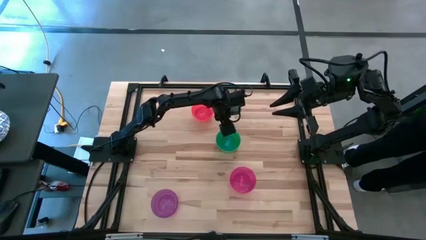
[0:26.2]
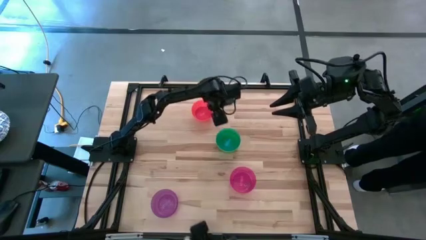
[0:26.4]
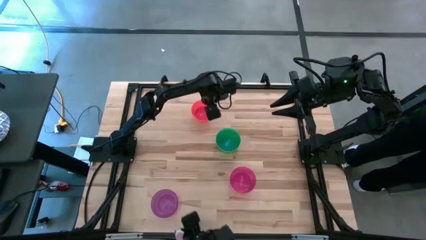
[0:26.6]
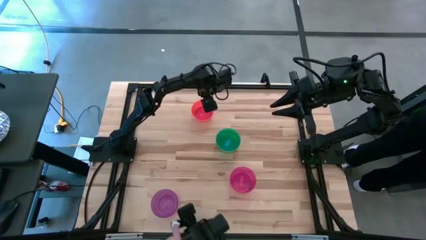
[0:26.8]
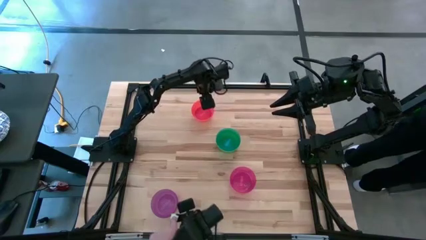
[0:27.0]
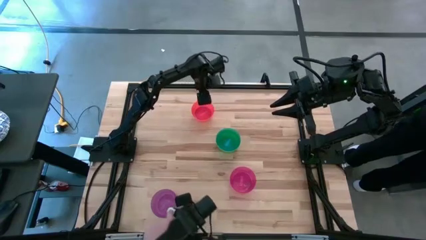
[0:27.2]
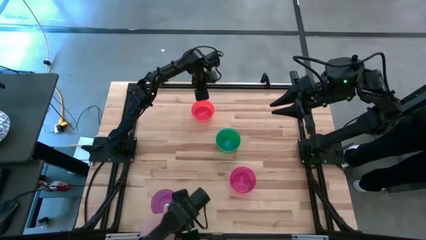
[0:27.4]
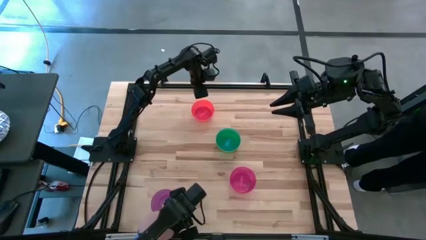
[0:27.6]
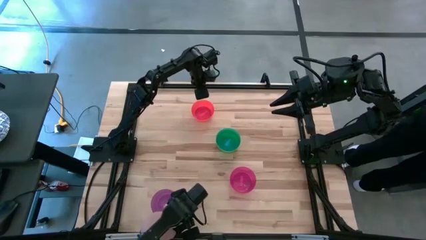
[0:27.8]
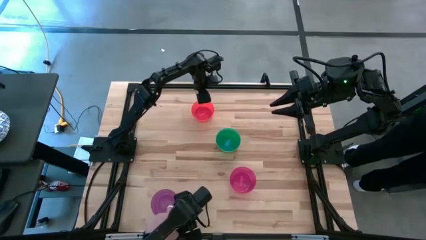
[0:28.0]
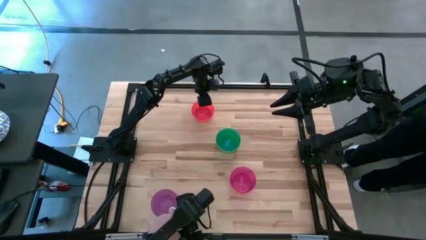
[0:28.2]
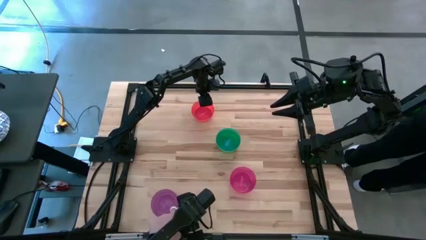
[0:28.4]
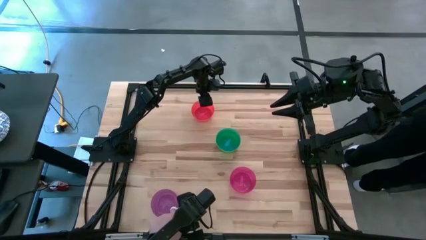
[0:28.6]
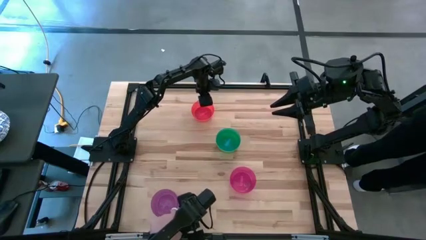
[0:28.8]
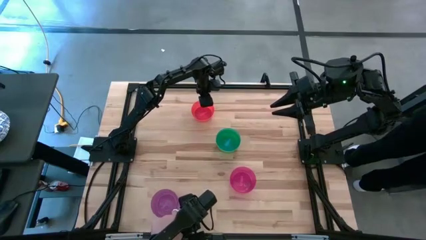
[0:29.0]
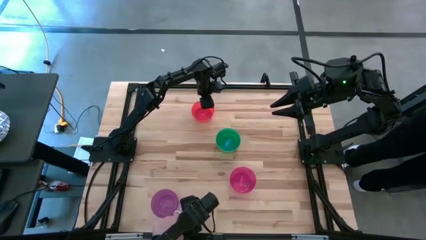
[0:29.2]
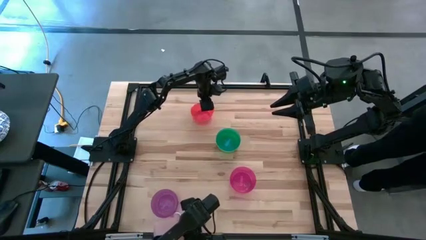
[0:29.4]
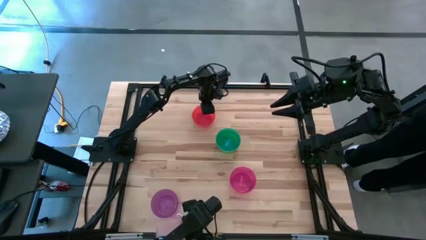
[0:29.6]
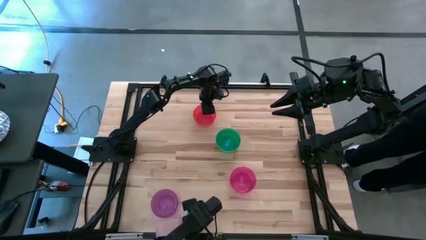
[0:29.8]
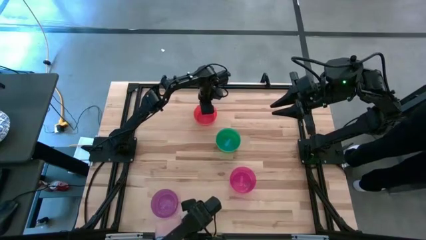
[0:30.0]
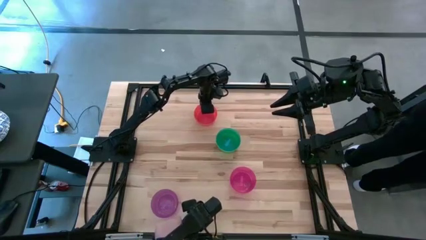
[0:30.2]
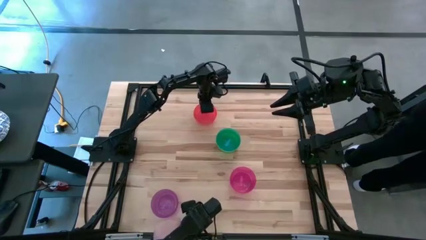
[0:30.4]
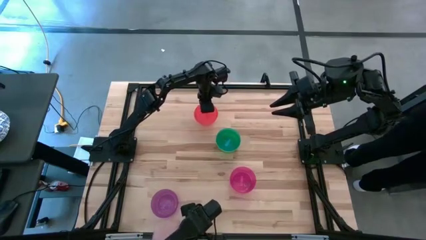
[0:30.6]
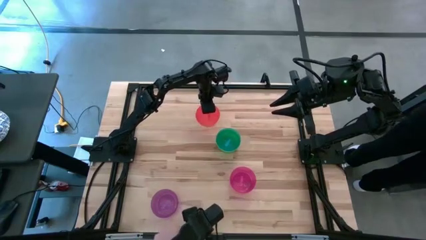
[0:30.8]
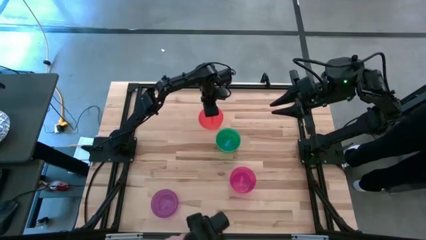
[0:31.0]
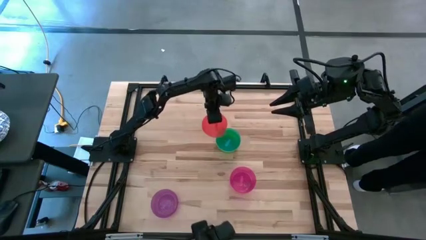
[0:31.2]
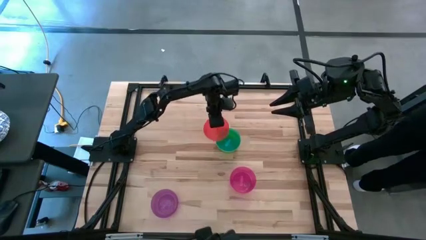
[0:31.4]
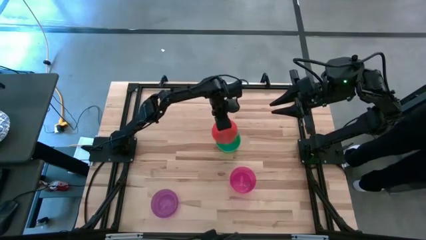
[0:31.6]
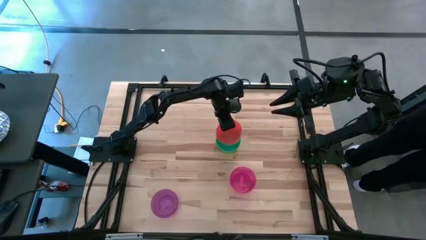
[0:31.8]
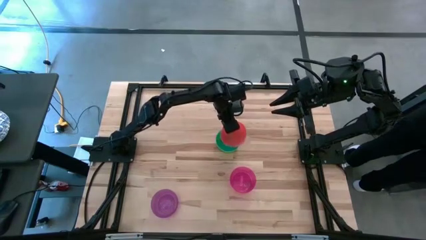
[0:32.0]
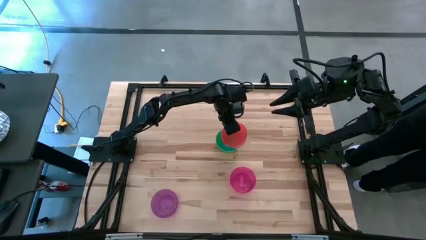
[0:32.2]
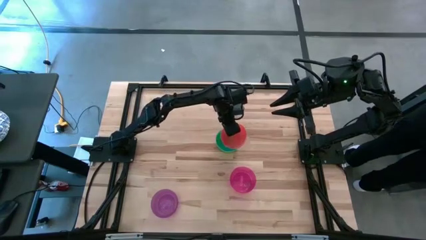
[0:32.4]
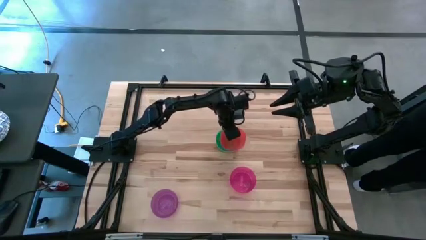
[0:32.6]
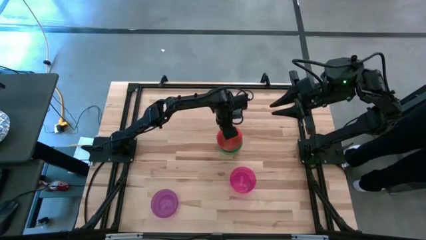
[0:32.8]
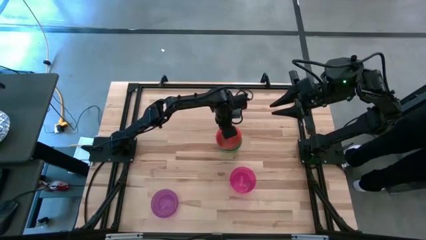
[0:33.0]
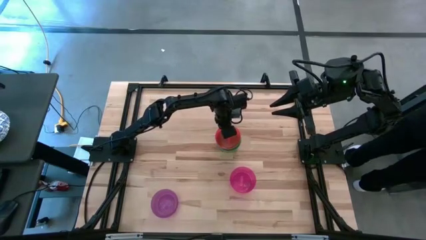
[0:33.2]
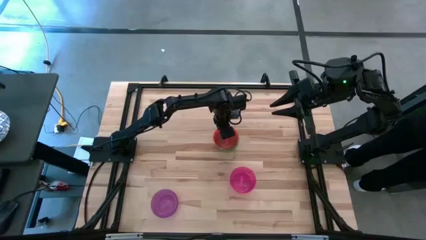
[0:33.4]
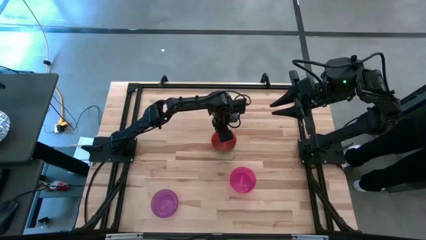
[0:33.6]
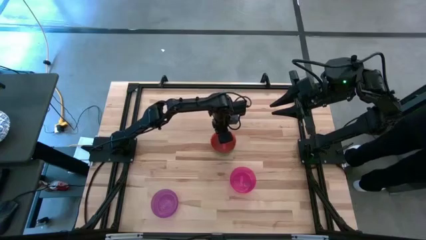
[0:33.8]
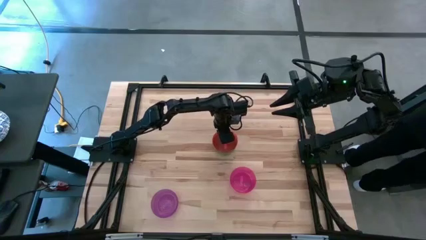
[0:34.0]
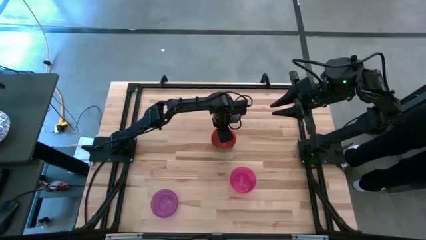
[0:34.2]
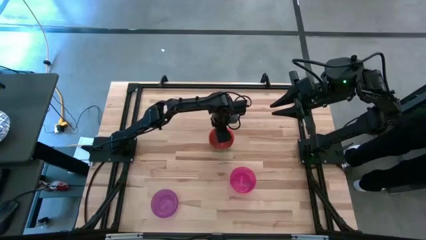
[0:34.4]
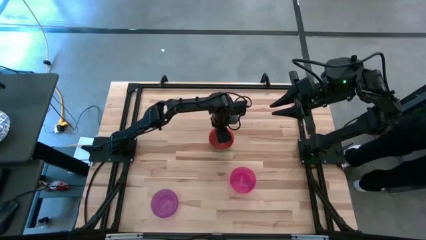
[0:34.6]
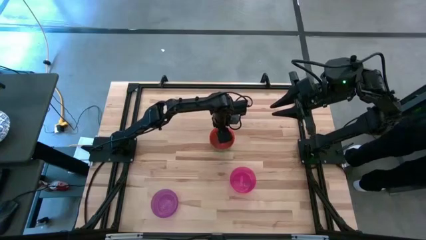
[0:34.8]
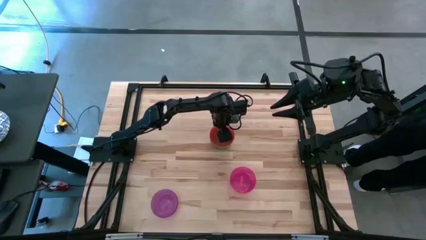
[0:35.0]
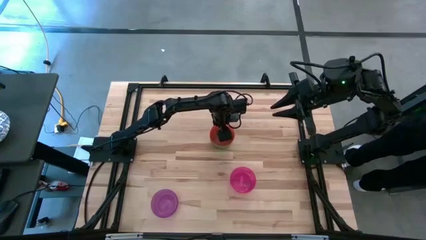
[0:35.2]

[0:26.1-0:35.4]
Task: Nest bowls inside each other
Stack the red bowl on top of the blue bowl

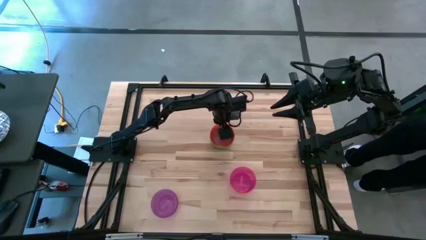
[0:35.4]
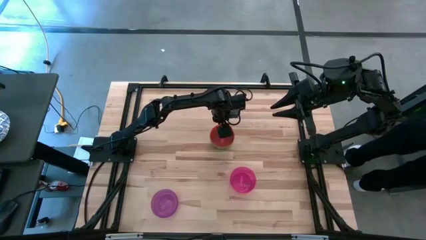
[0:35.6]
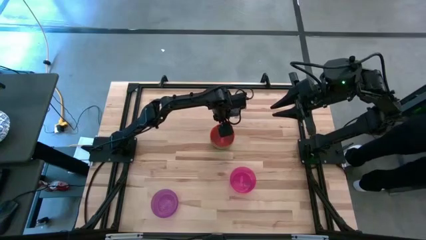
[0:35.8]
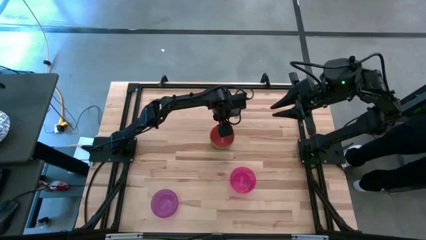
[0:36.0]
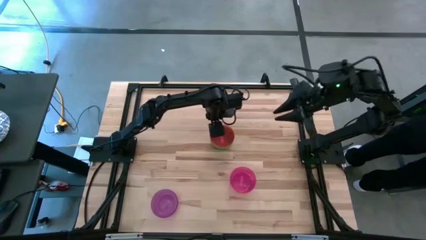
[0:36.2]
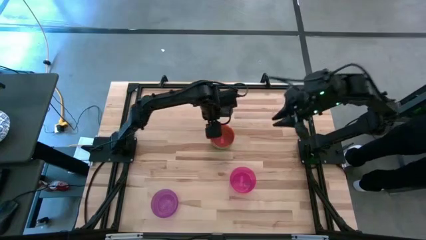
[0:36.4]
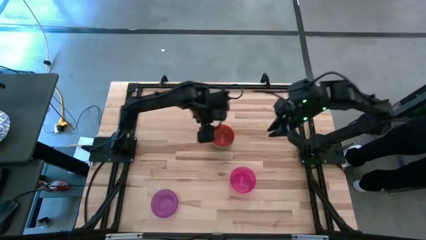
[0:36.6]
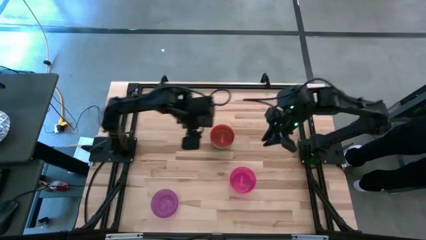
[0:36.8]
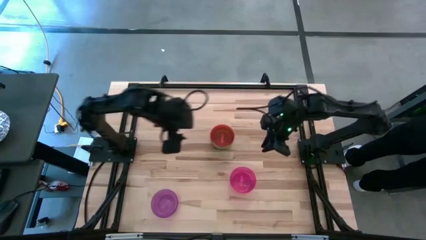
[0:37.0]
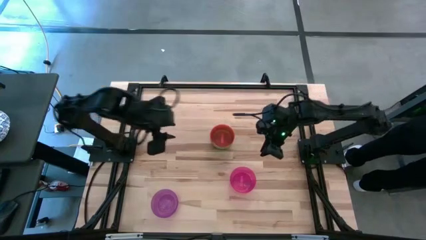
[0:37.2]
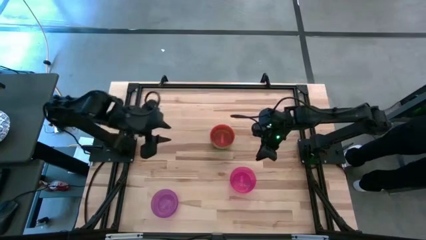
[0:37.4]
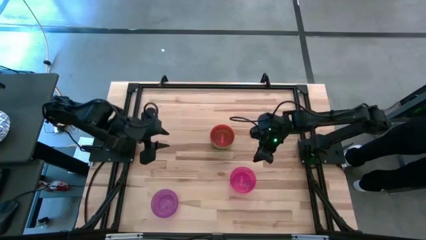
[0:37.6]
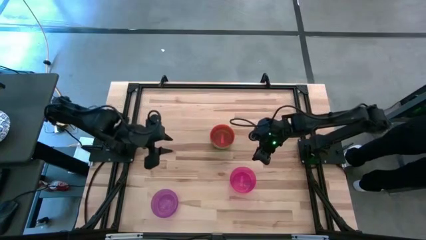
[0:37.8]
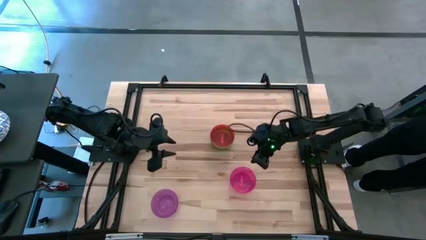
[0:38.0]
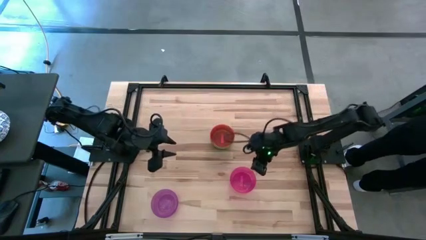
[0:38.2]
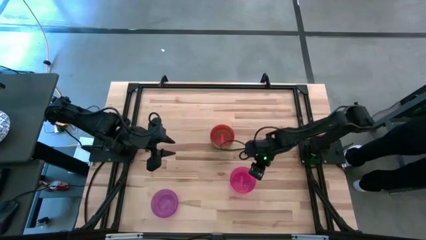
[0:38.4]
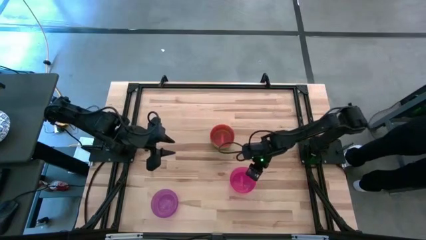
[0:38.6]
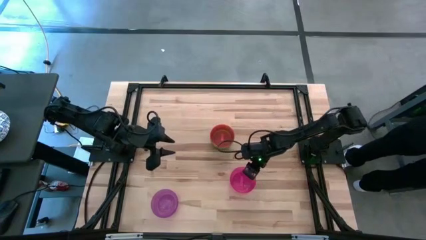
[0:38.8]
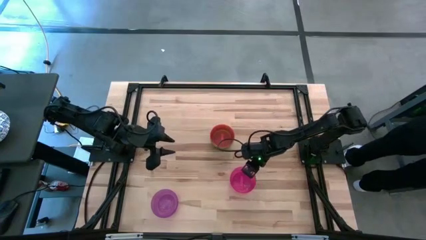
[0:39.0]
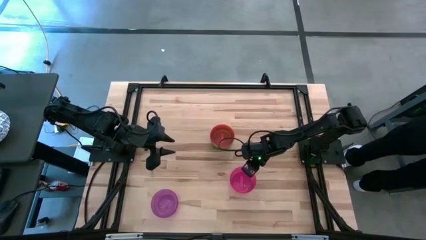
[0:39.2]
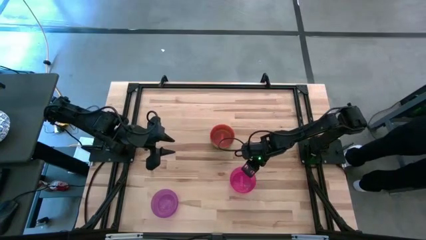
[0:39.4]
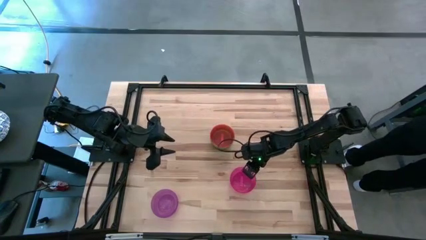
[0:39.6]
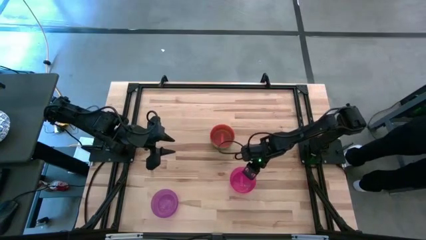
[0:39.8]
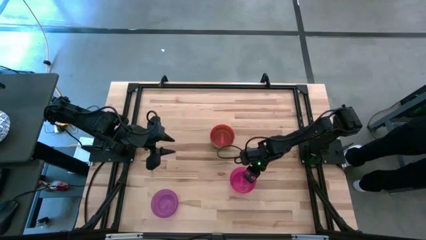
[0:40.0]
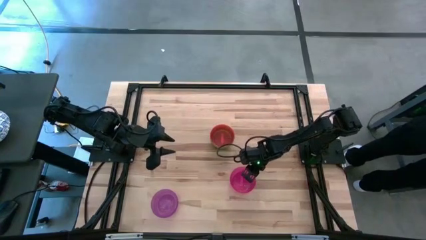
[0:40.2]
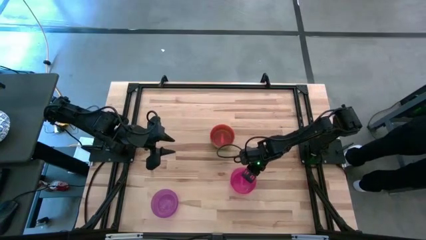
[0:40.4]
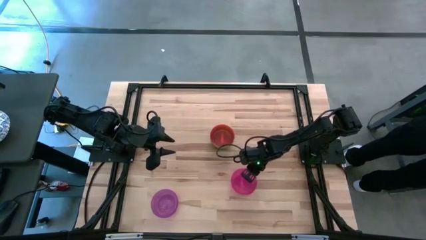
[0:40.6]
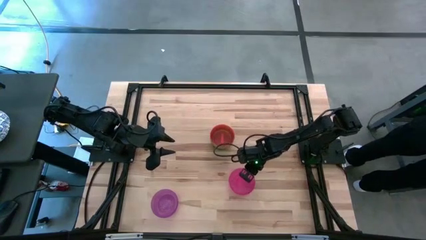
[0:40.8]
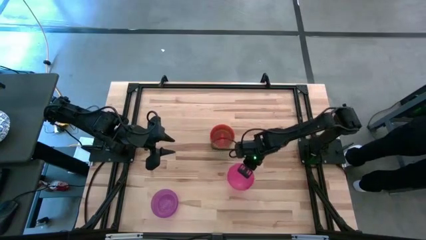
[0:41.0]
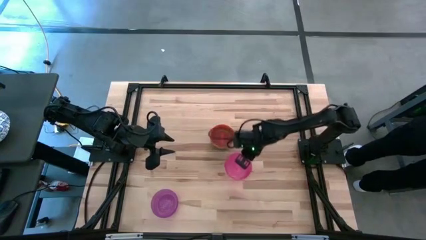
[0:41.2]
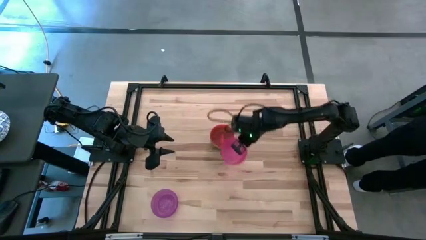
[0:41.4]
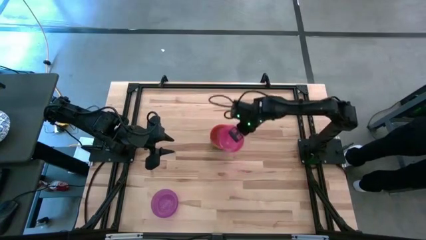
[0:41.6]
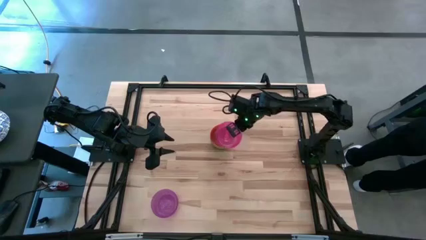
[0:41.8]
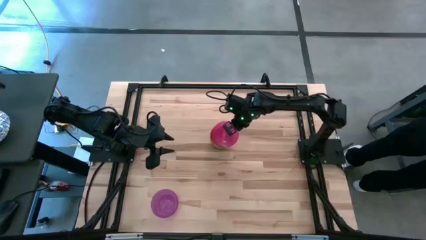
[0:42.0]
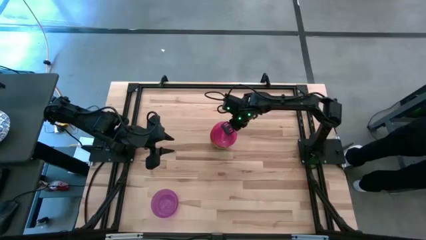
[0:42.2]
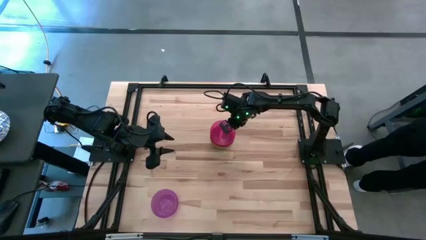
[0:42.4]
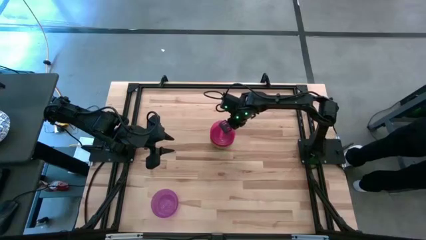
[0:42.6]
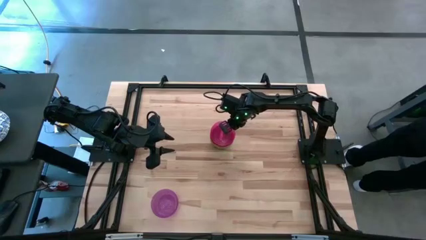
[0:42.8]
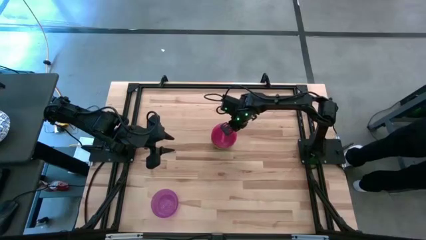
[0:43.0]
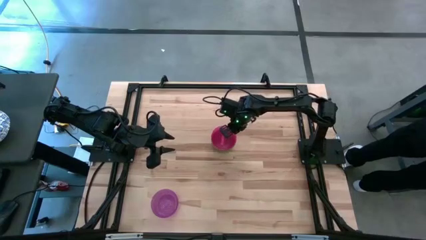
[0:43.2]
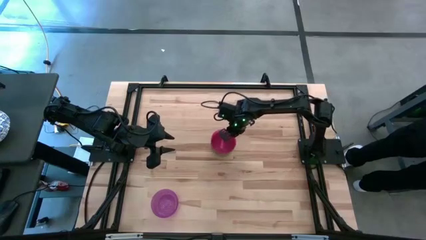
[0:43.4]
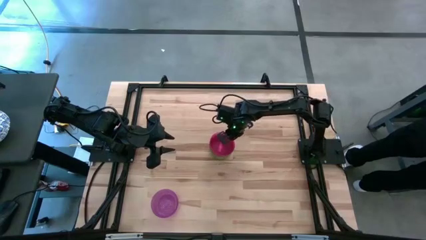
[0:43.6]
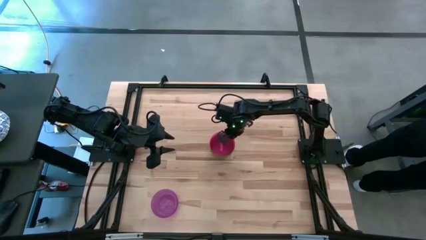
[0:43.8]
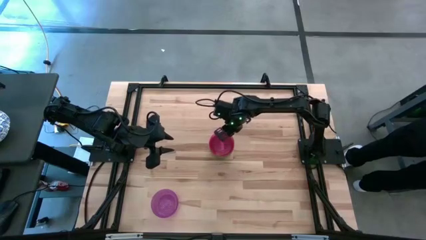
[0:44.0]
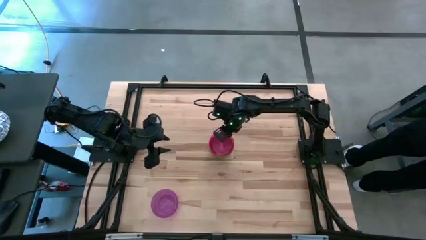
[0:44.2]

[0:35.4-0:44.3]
Stack the pink bowl on top of the red bowl
